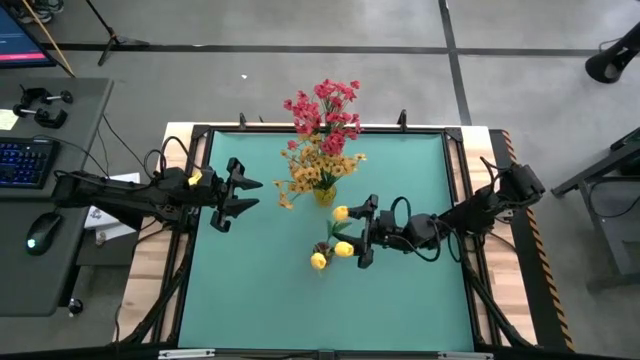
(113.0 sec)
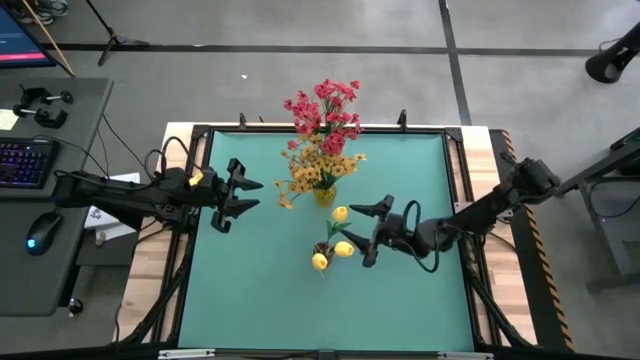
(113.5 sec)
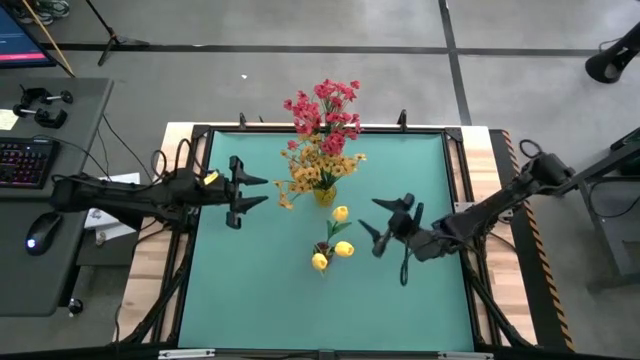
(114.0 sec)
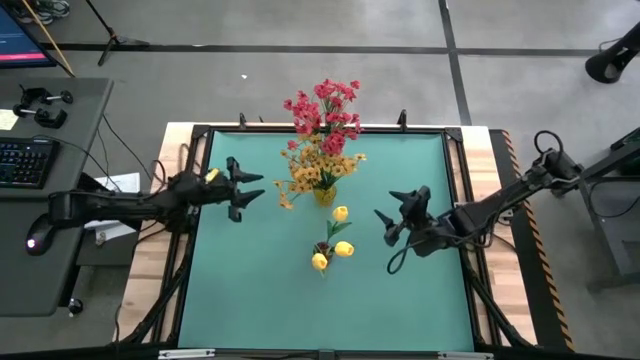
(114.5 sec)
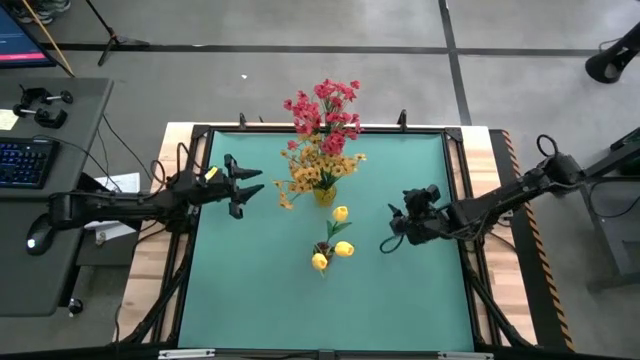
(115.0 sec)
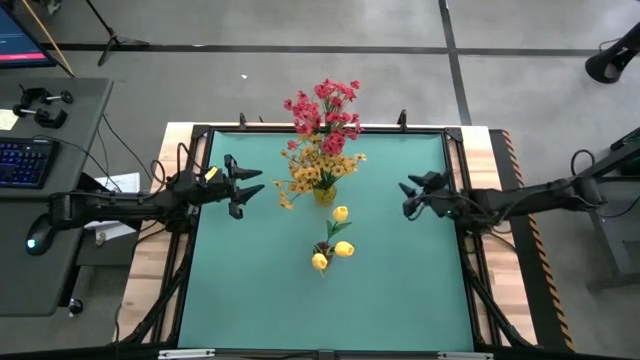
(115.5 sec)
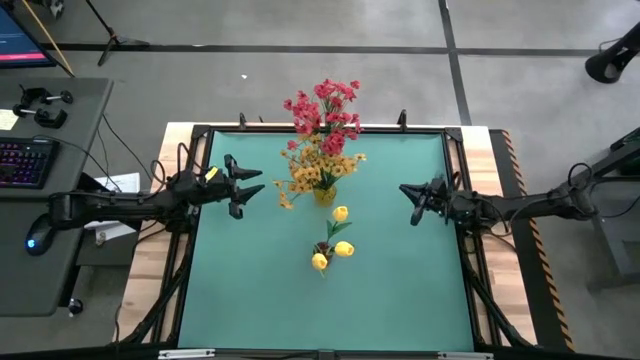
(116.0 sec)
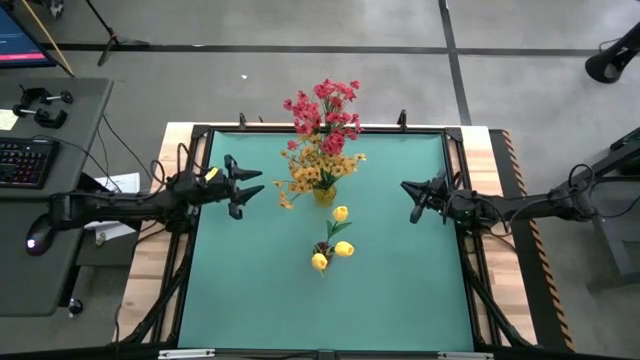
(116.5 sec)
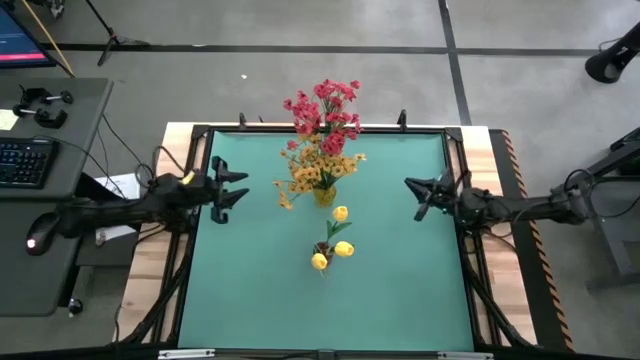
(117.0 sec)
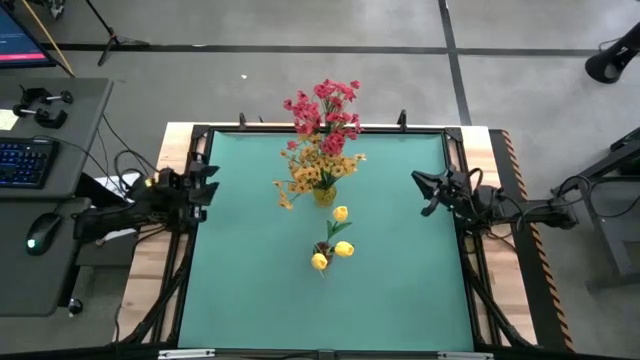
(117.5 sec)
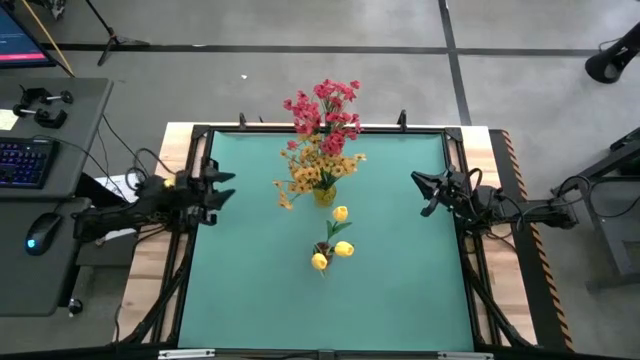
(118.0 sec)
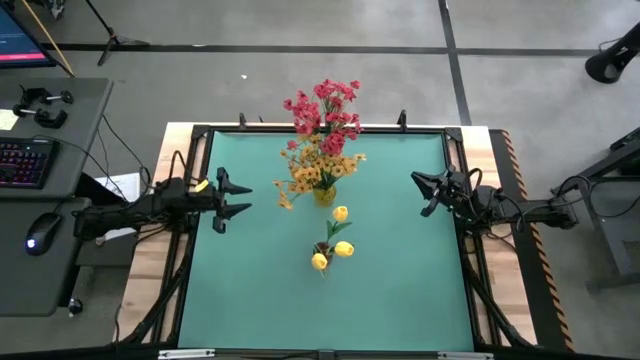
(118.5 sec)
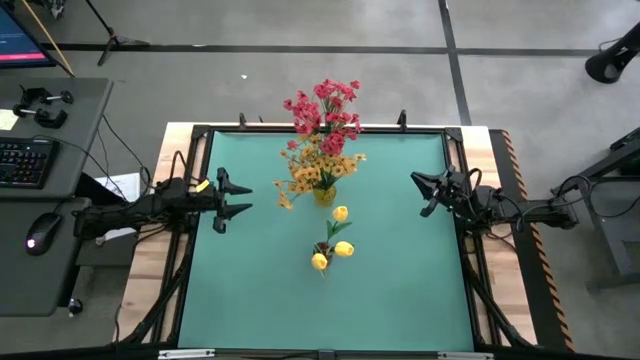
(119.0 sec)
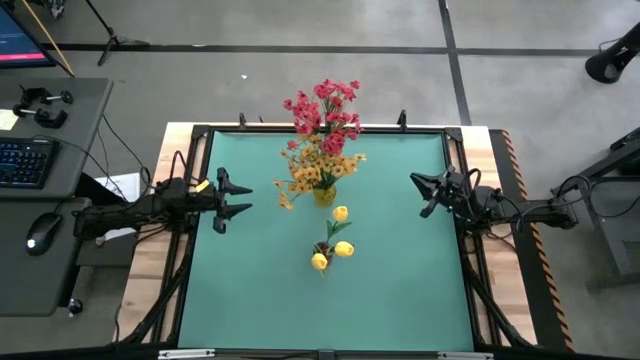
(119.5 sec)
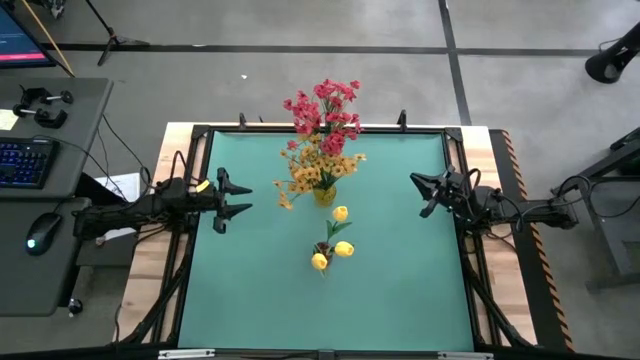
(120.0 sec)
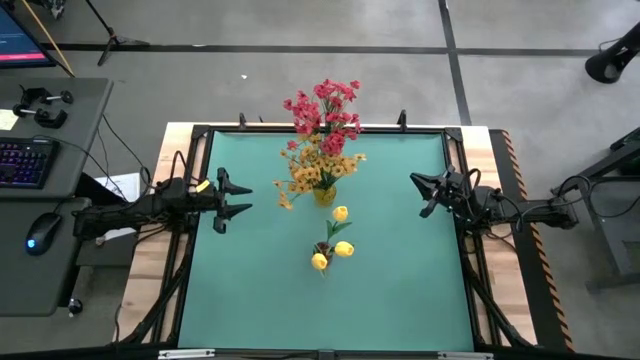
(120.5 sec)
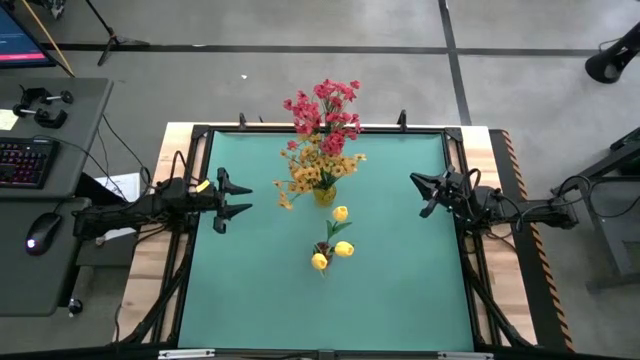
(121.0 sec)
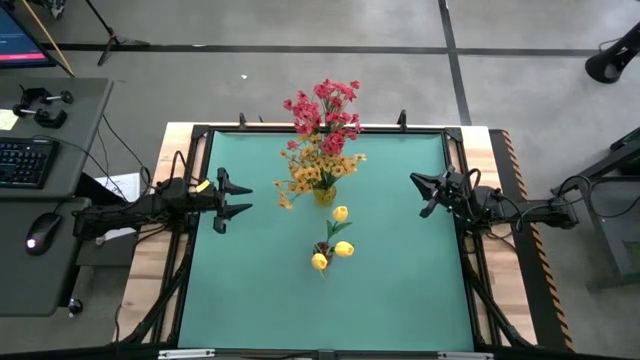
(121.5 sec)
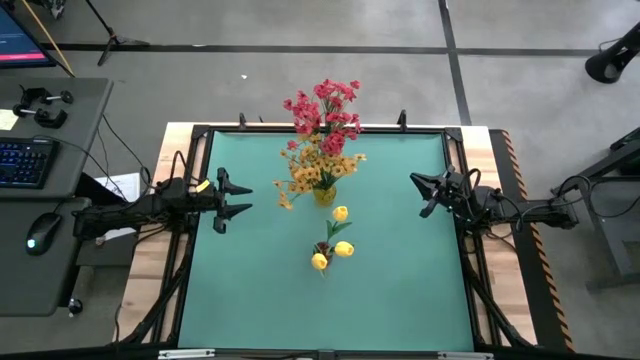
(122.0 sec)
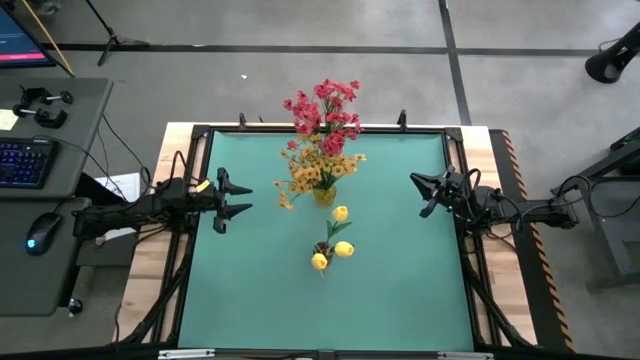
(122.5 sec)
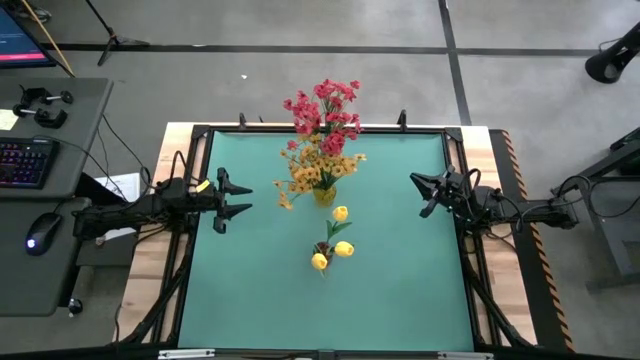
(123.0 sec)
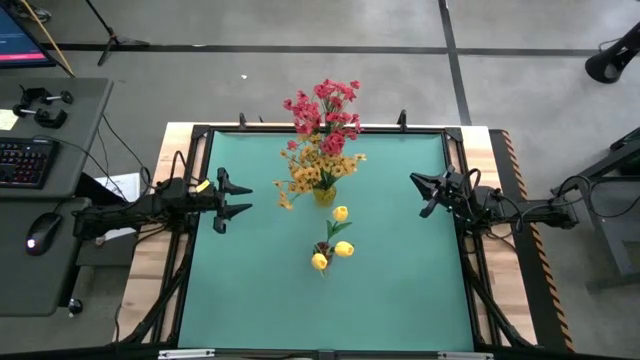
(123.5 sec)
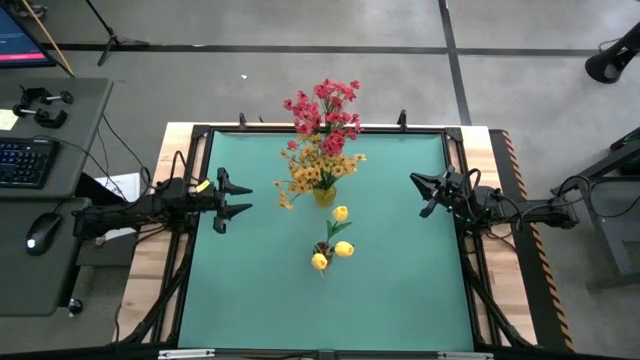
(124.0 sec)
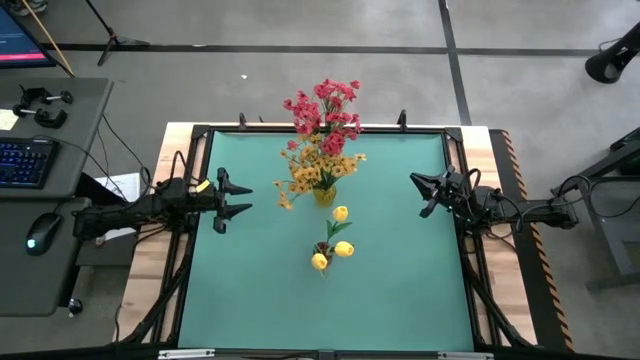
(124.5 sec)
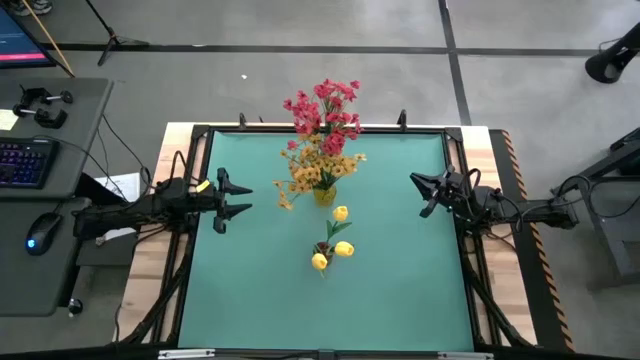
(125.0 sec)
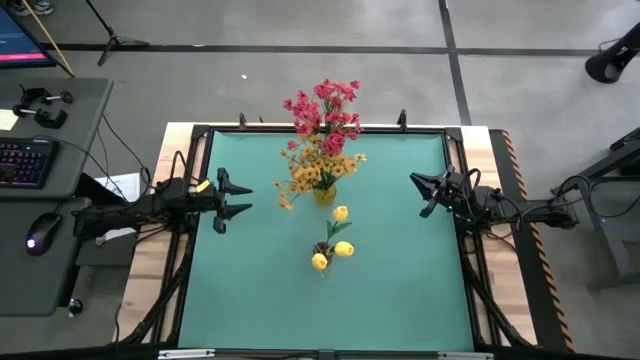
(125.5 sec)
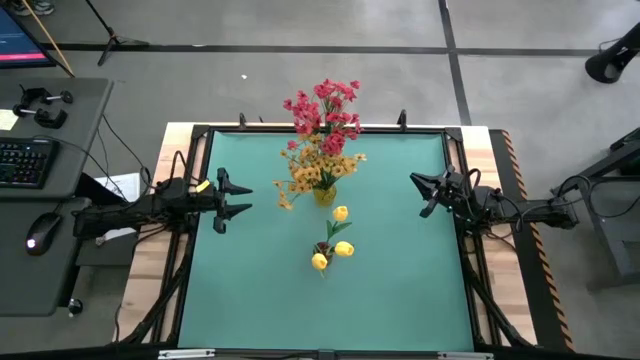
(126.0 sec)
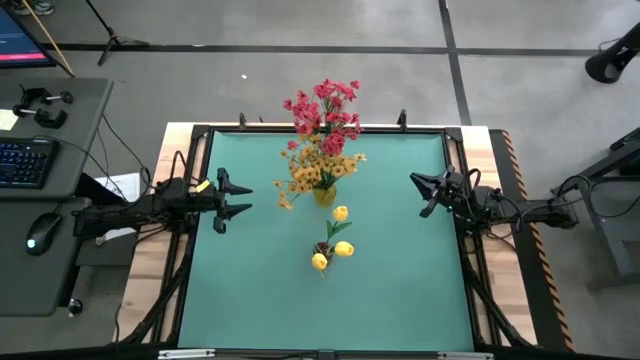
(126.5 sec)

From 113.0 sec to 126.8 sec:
Task: Sort flowers into vase by color
Return to Home Position

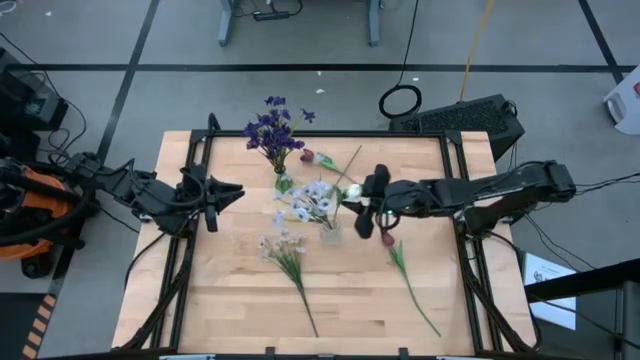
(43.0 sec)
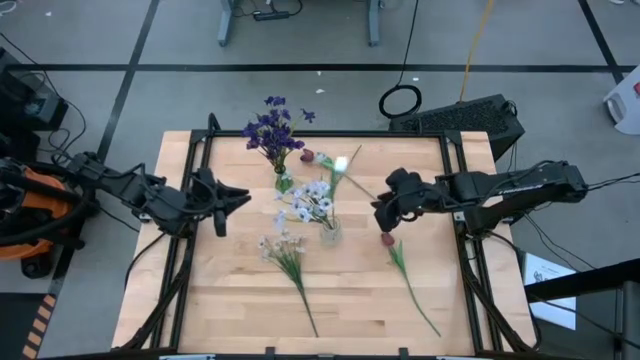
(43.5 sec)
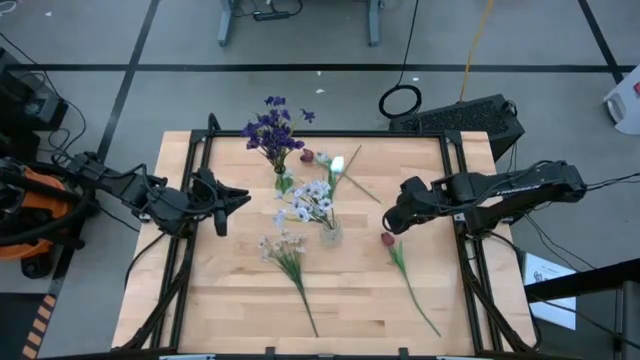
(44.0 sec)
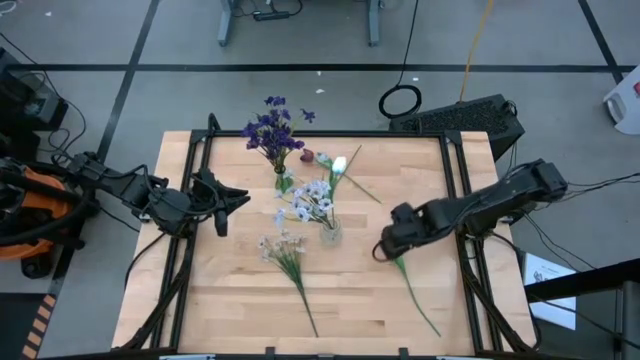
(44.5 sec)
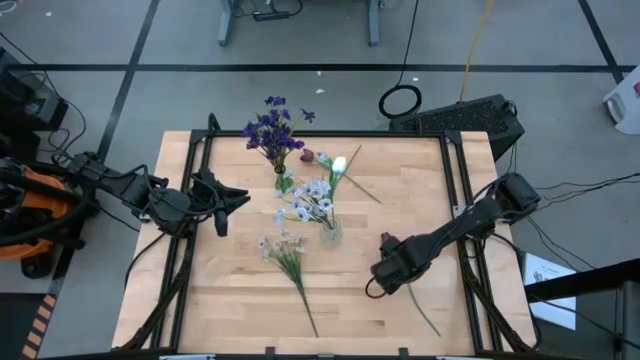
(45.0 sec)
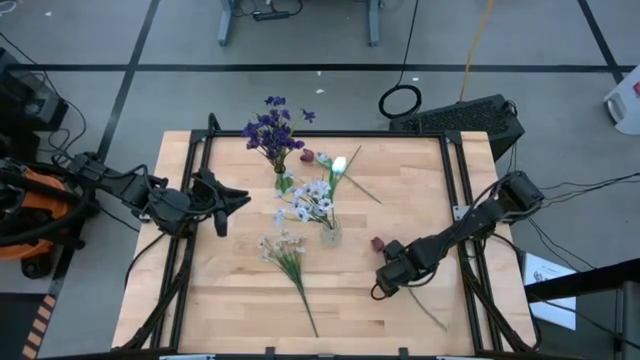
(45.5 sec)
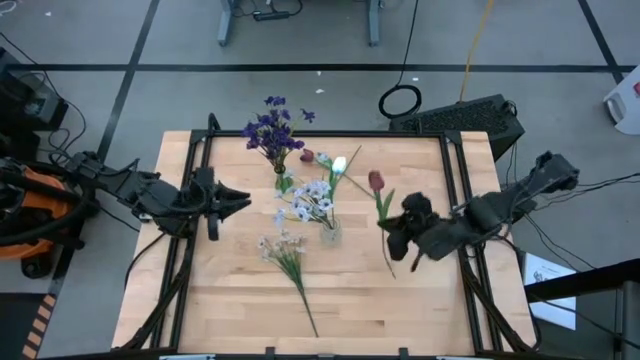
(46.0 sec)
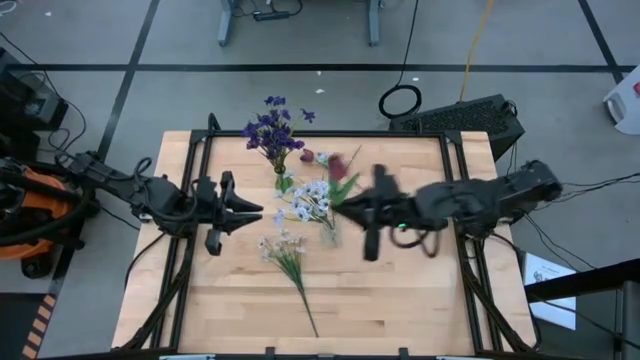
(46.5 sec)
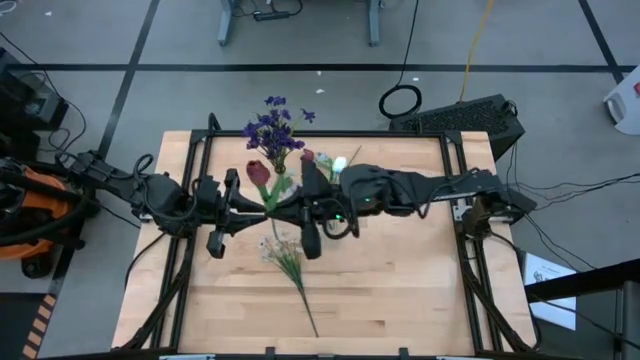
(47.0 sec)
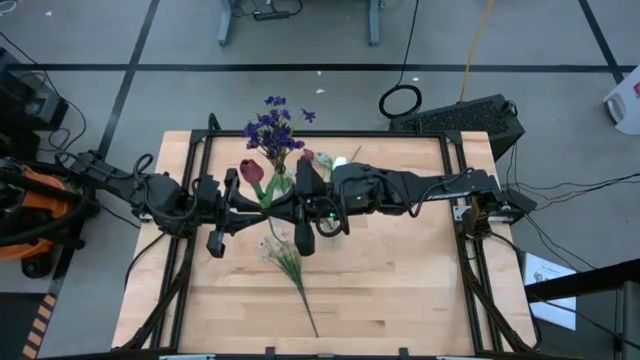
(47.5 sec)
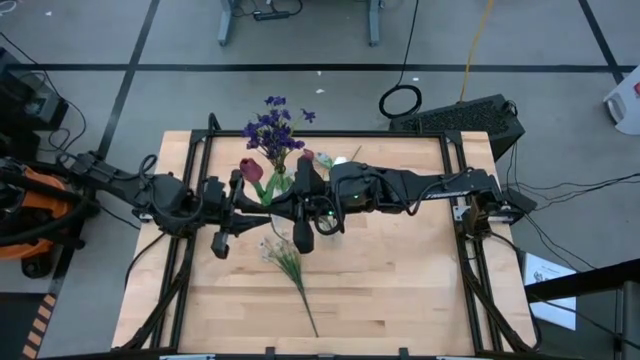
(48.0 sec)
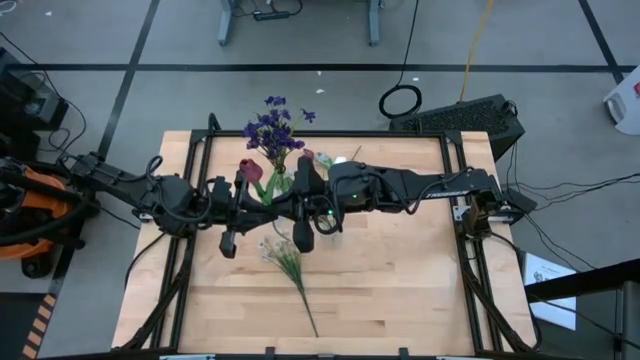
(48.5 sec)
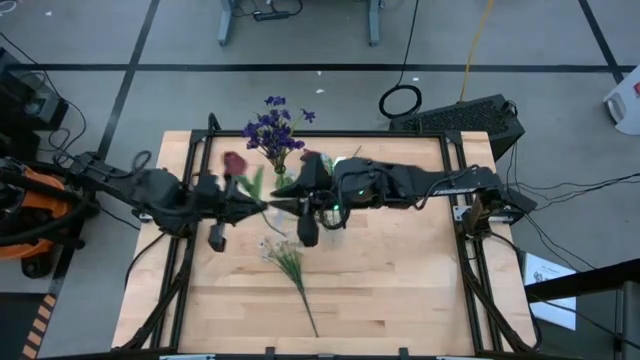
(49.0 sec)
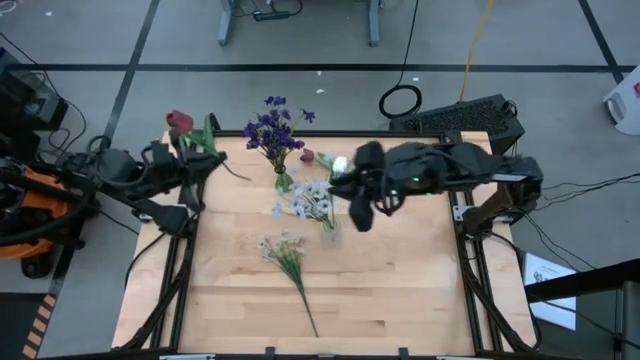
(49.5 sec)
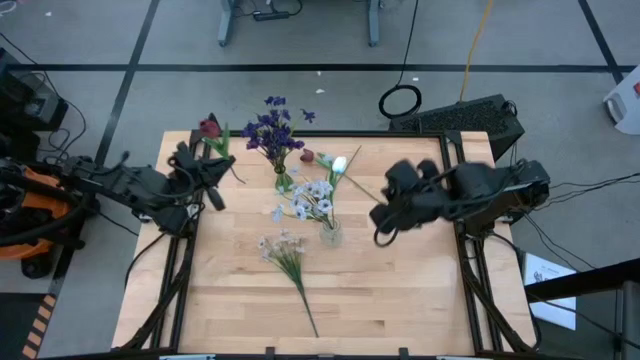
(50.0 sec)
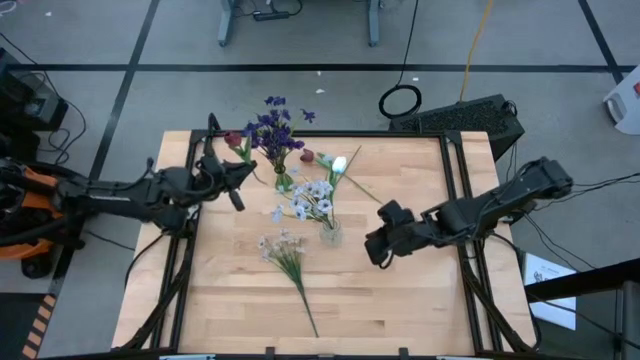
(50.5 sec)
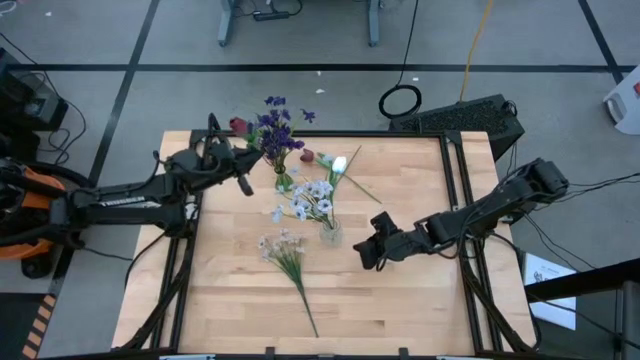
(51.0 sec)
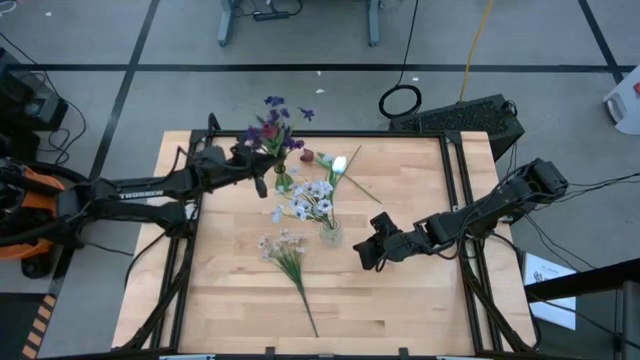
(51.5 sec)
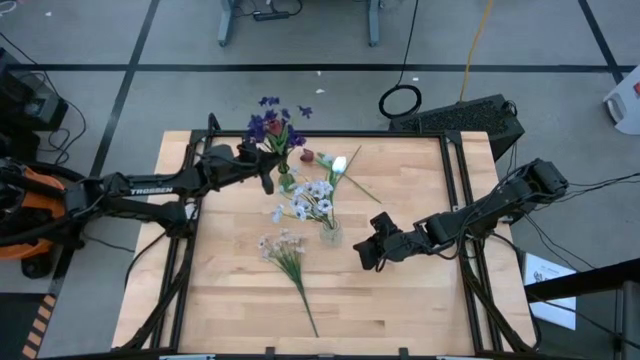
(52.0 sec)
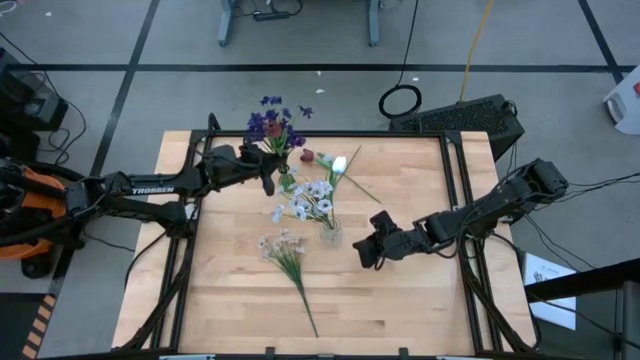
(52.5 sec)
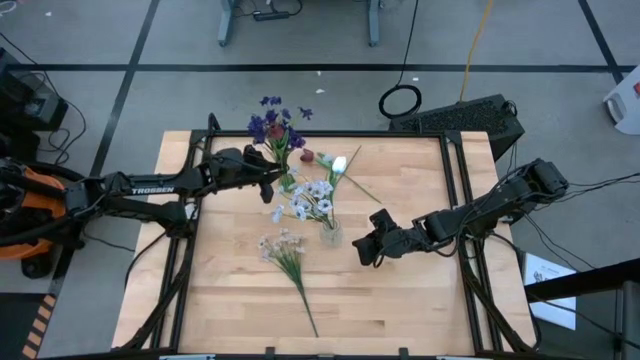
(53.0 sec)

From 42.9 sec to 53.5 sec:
Task: Sort flowers into vase by color
Put the bottom red flower into the green vase
